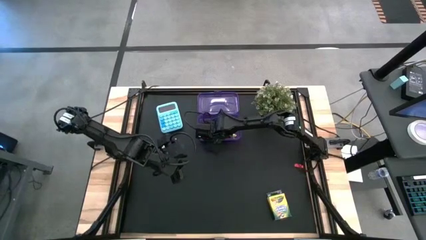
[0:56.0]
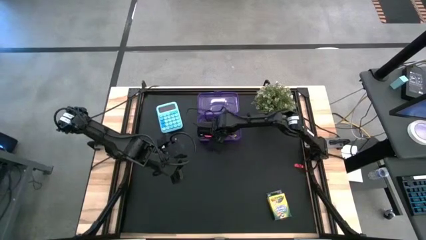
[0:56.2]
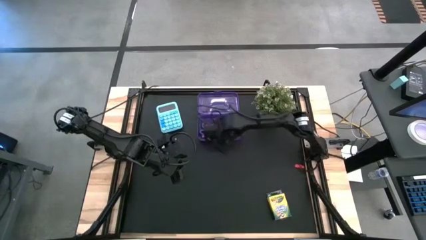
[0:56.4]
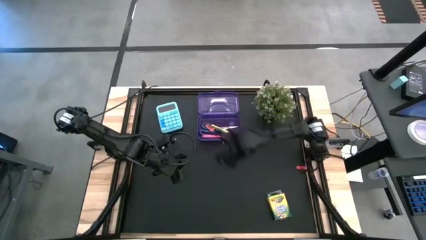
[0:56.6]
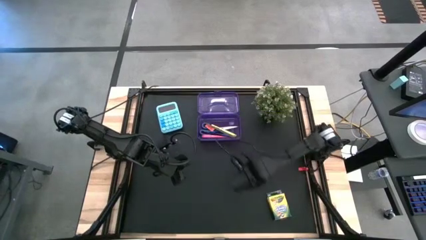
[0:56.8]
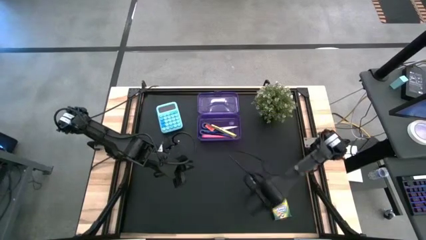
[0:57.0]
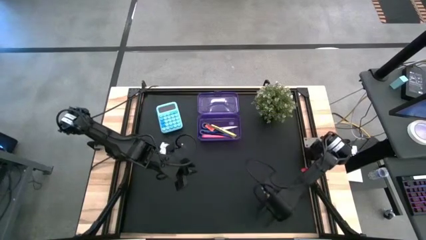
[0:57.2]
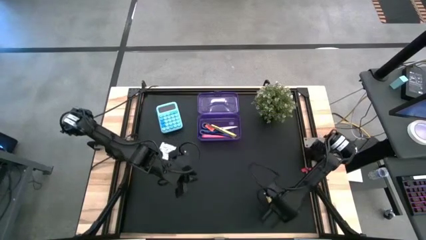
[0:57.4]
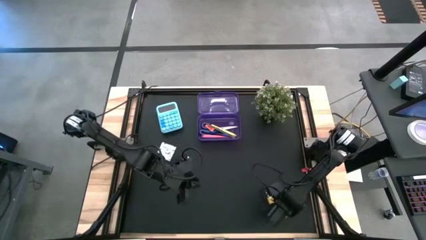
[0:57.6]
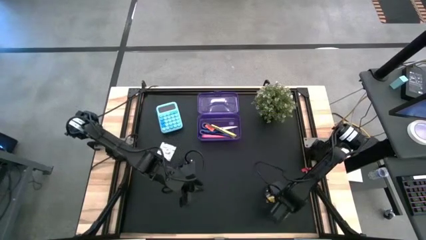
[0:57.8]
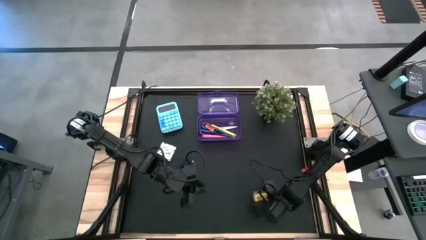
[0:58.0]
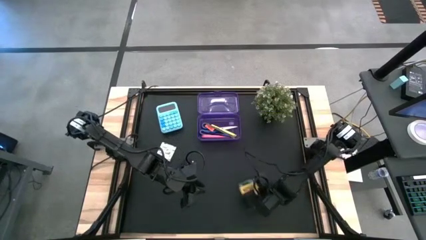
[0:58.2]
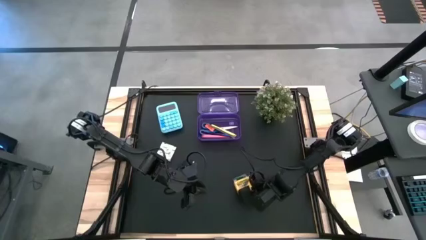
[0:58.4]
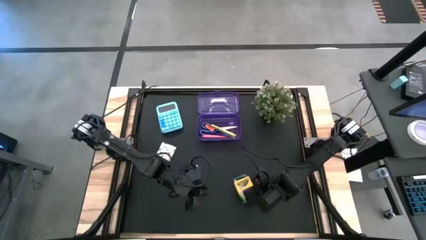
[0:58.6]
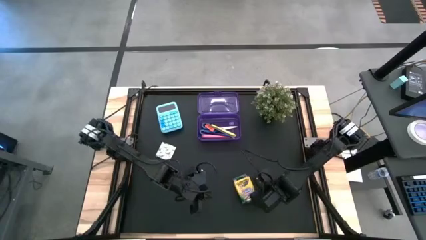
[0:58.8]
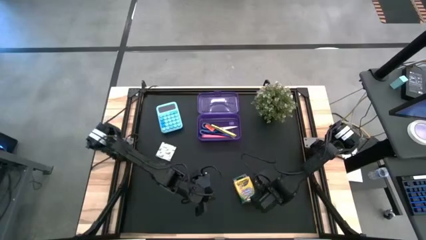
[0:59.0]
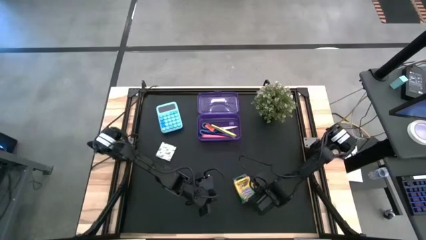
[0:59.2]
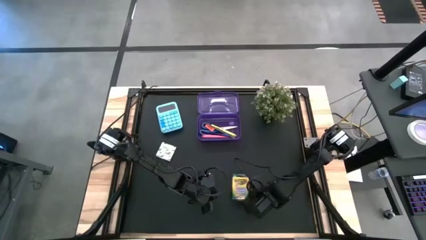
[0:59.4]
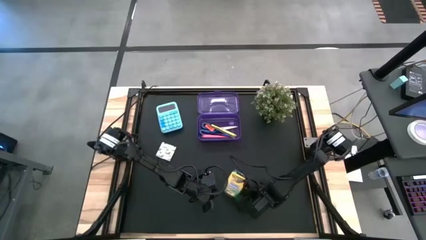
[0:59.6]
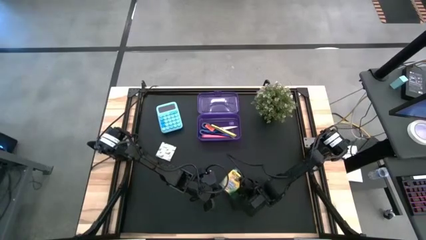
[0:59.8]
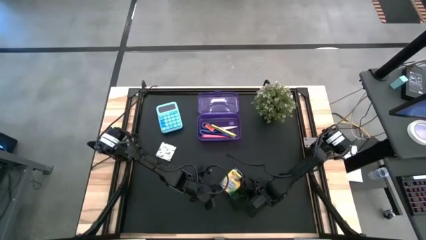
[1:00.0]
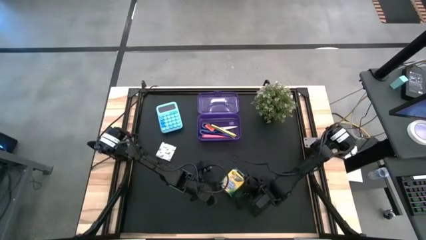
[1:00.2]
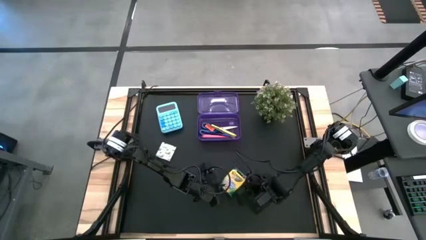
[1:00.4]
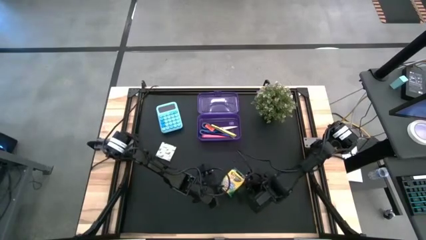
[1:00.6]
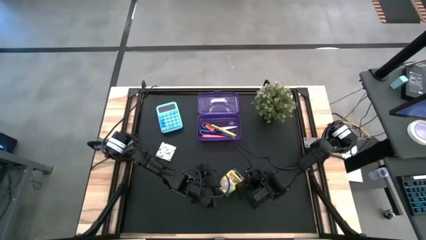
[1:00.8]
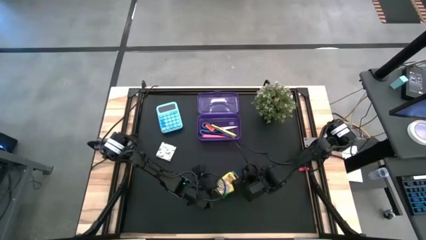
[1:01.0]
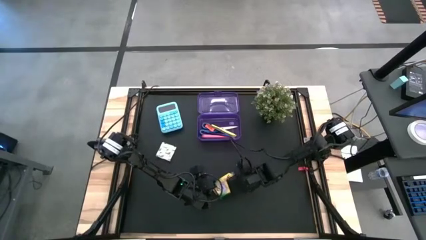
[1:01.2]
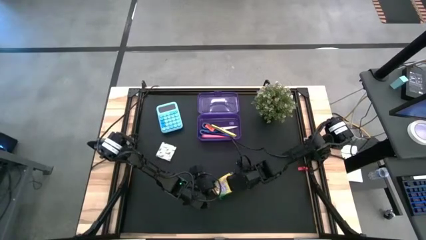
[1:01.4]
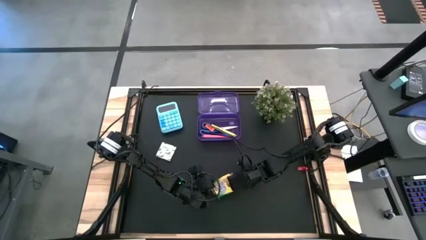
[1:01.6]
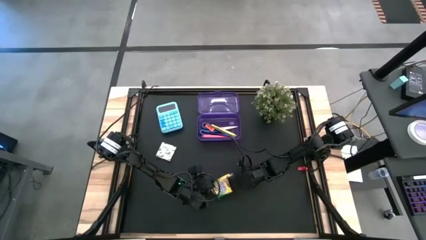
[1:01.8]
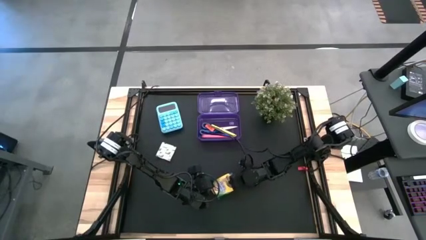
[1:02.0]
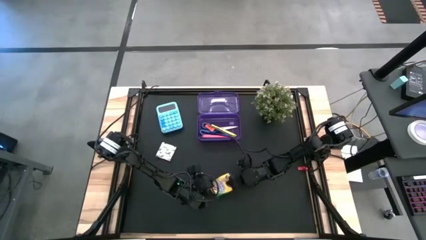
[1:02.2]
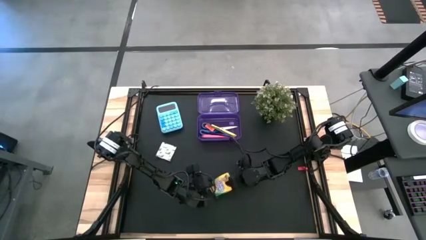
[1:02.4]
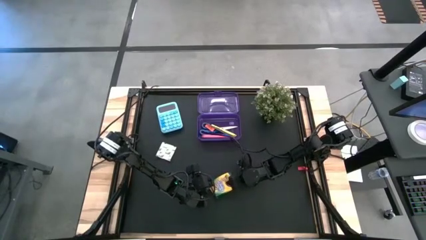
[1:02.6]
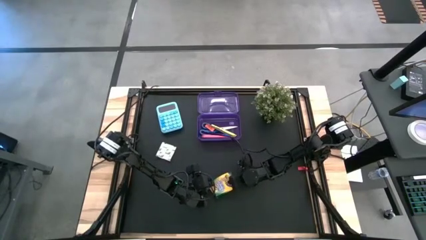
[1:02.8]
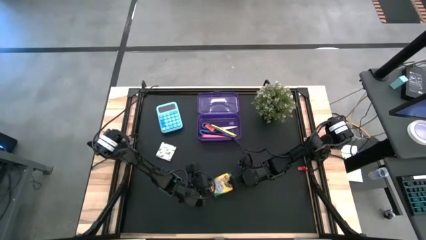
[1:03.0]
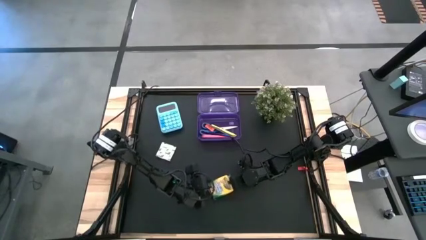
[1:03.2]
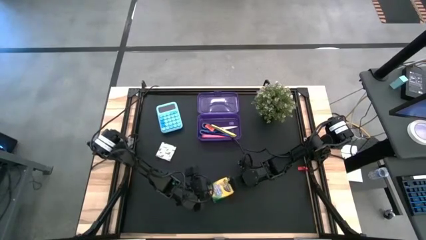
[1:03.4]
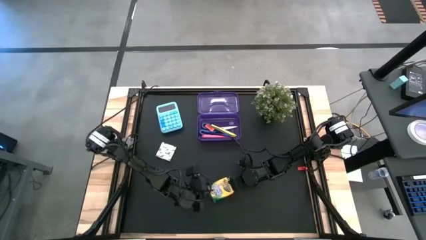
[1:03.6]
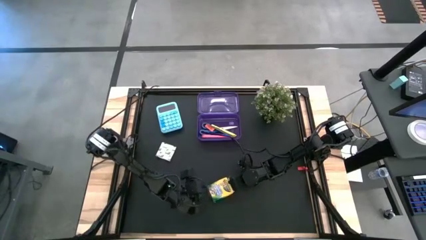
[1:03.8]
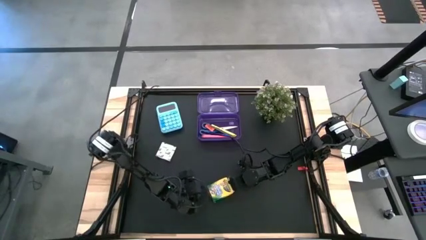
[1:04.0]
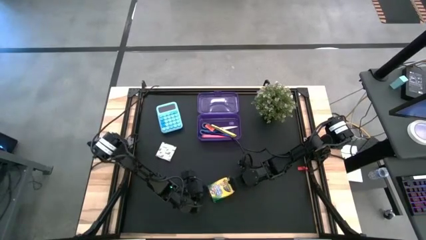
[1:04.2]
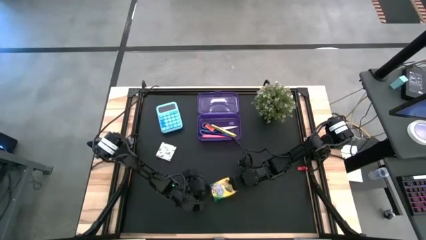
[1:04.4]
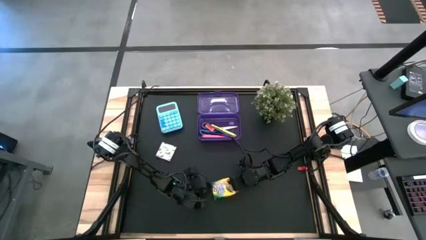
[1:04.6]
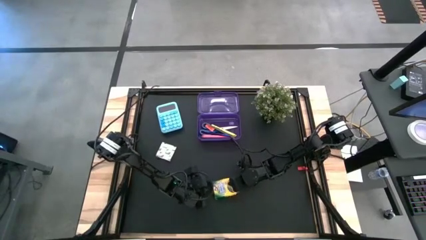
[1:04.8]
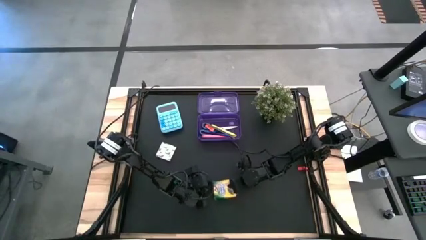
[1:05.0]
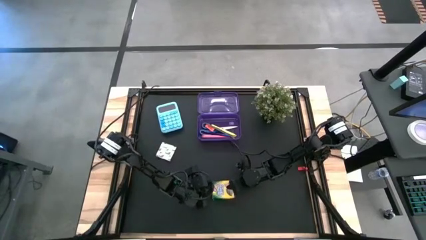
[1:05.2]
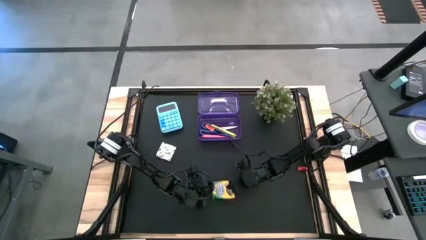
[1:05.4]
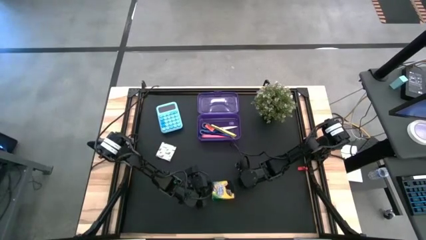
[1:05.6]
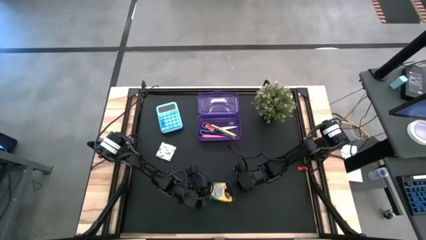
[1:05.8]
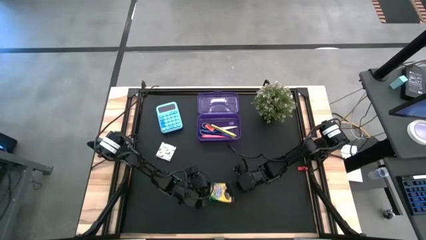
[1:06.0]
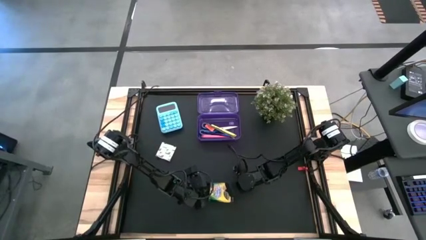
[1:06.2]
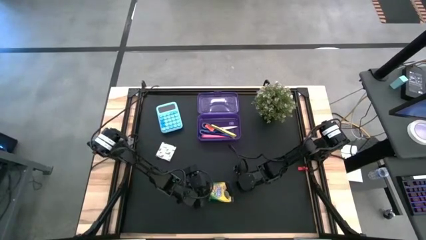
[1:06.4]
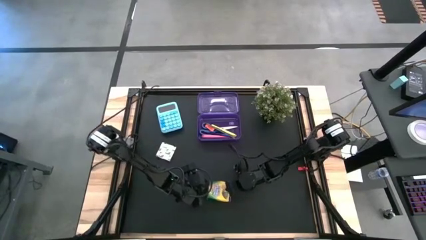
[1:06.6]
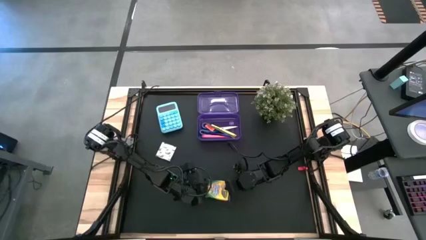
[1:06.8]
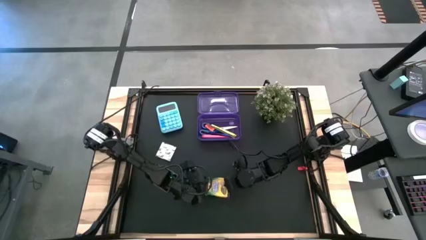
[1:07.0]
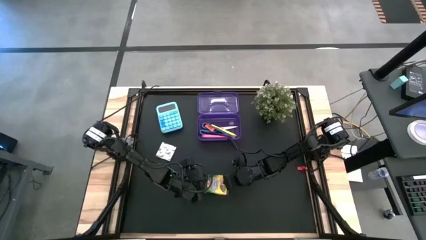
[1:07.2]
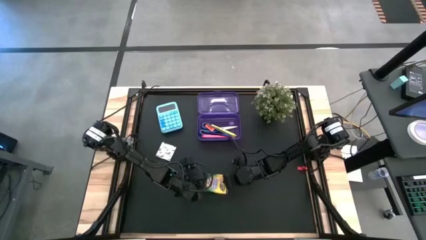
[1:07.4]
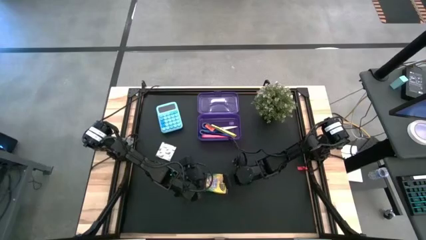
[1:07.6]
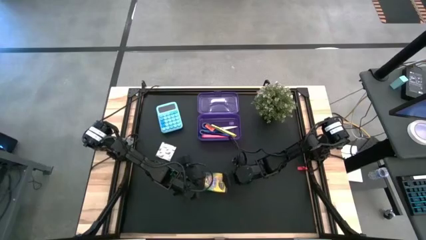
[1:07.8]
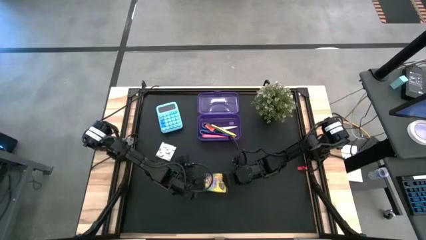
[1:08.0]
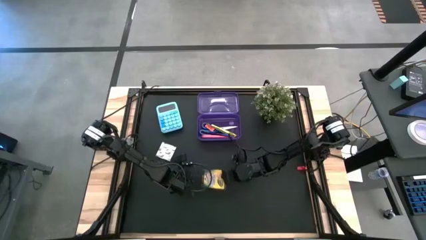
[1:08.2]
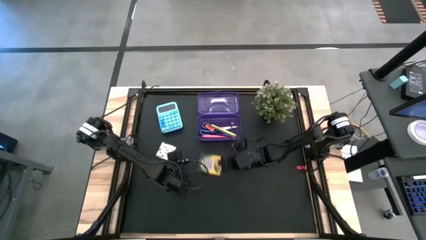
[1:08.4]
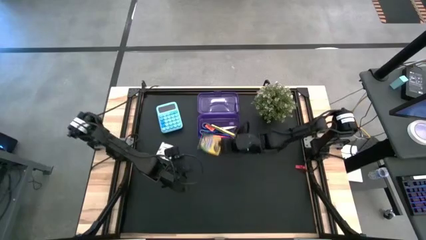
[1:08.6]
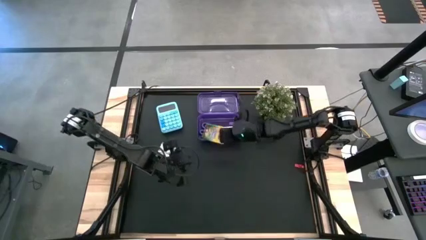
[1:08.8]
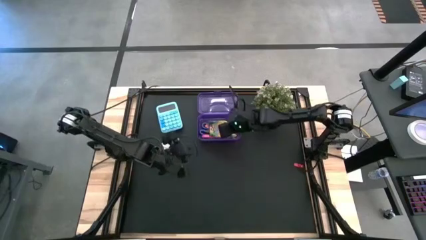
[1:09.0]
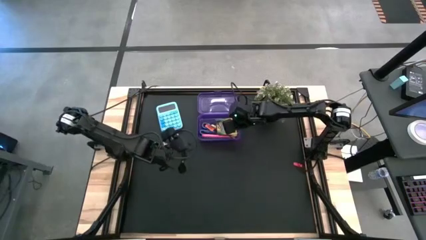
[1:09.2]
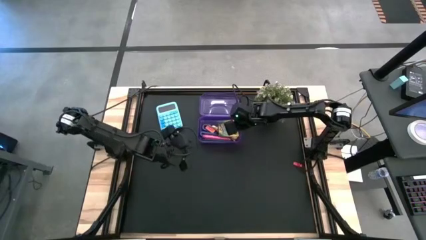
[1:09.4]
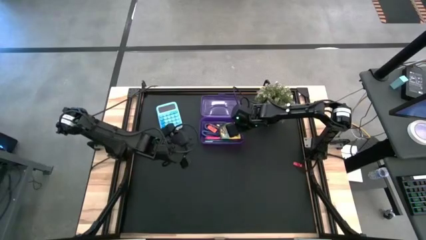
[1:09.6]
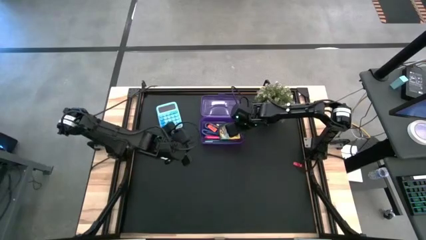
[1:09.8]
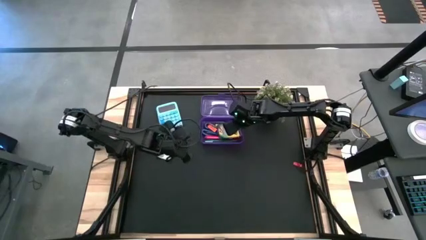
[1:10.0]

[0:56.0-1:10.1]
Task: Pack school essentials
Put the yellow crayon box into the purple supply box

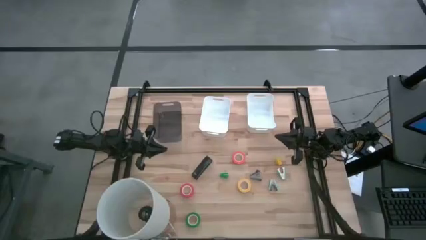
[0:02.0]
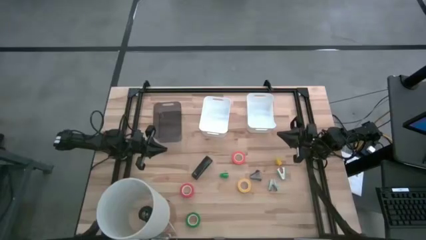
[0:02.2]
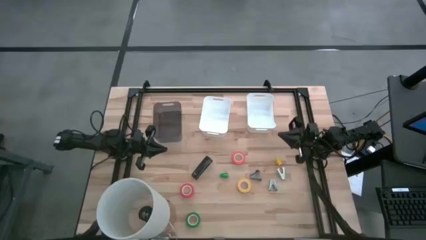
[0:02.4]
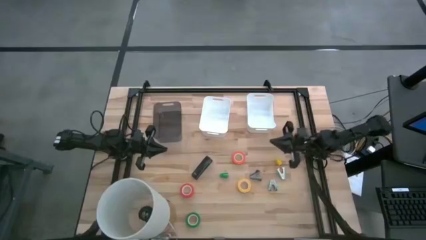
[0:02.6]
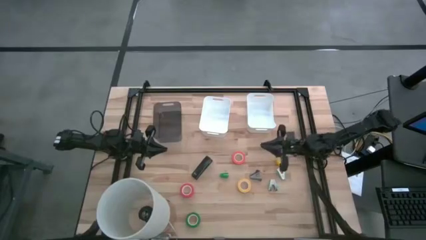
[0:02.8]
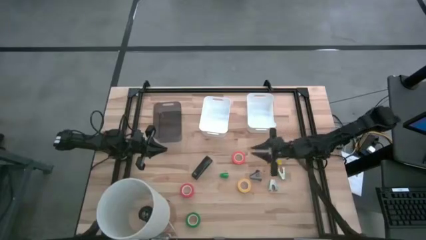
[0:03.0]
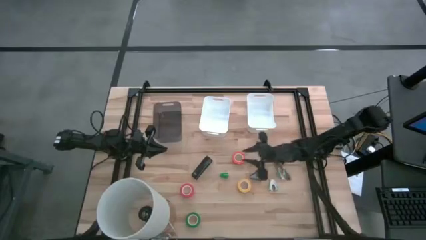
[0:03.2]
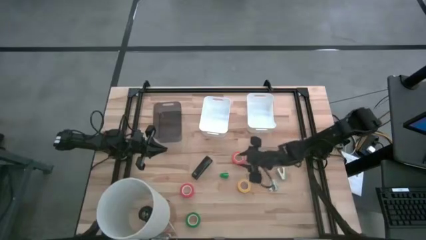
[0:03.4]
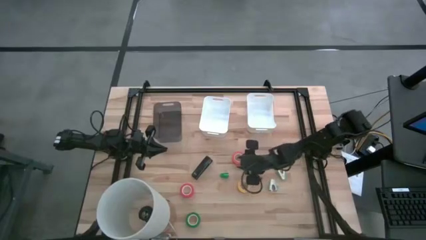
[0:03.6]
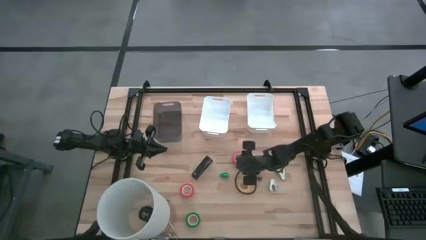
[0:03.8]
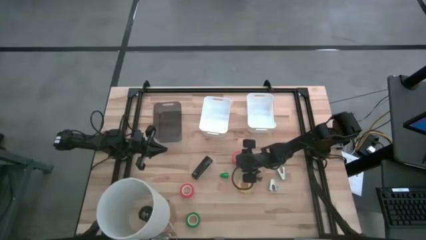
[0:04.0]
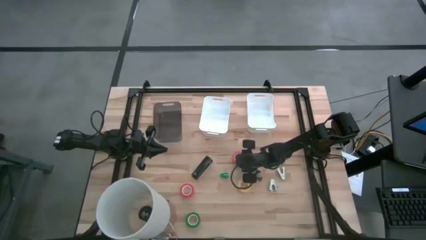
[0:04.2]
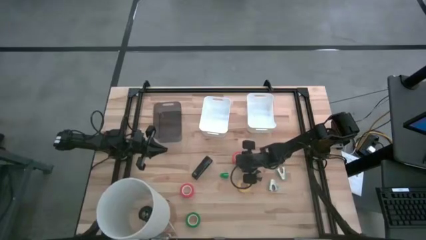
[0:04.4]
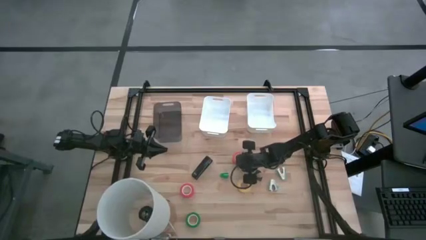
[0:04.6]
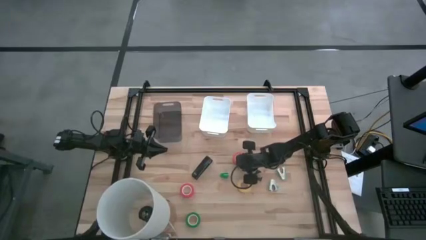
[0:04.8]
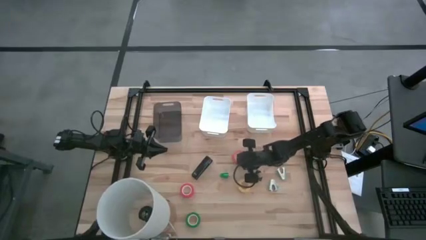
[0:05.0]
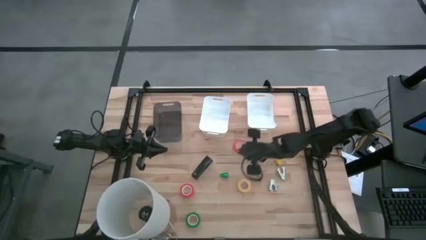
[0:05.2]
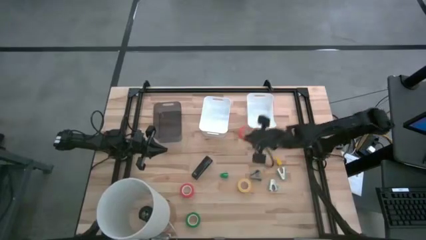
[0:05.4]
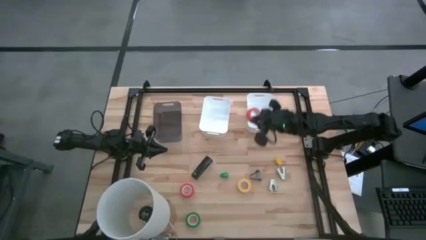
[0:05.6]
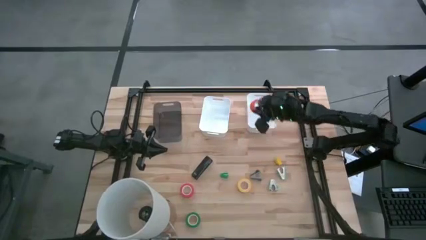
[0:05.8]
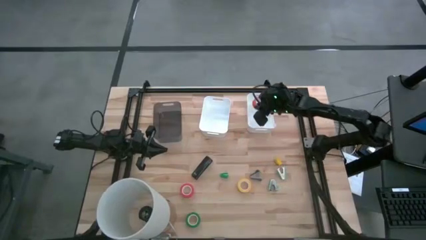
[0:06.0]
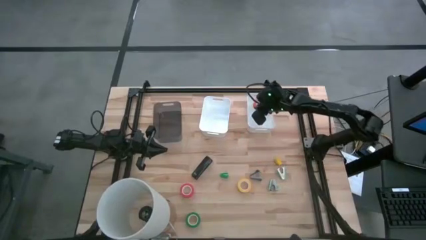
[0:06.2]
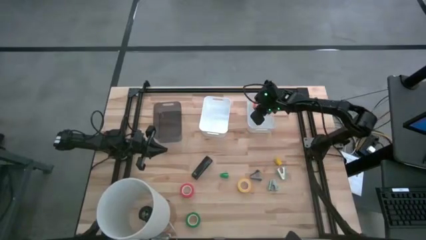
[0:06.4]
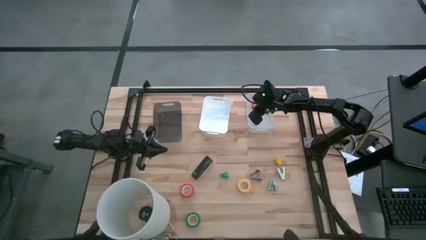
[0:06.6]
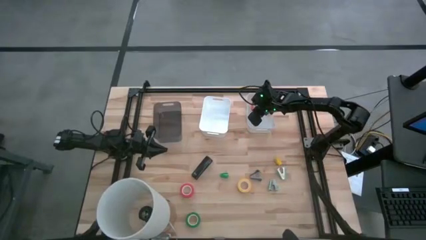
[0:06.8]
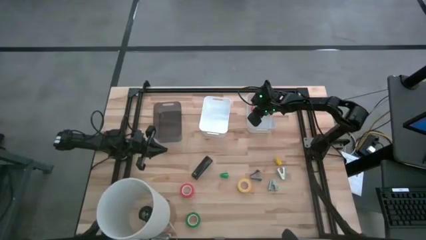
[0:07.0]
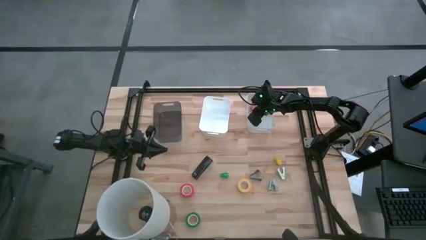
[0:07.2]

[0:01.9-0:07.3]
Task: Pick and place Stapler, Stapler remover, tape
Put the orange tape into the right white bin
